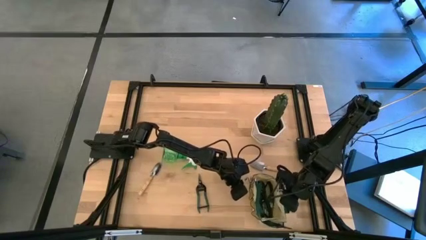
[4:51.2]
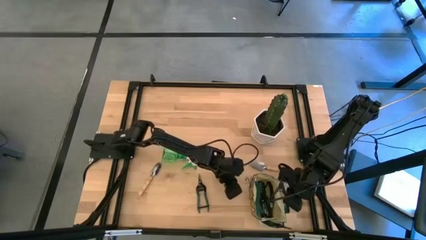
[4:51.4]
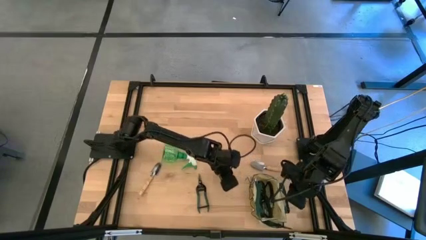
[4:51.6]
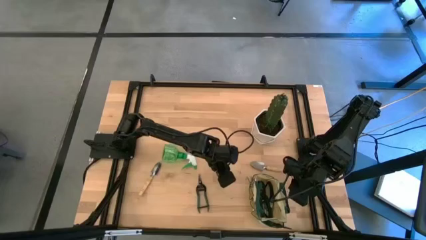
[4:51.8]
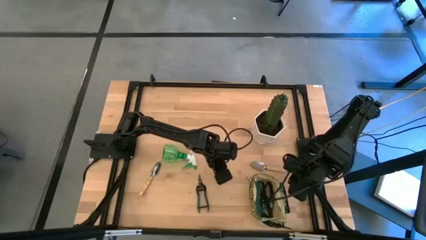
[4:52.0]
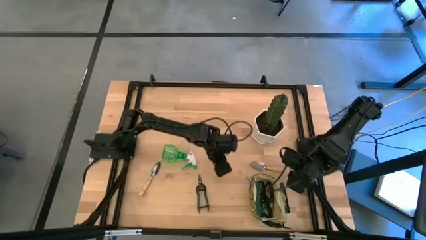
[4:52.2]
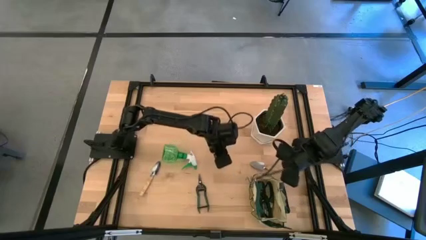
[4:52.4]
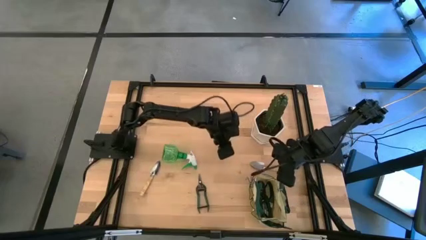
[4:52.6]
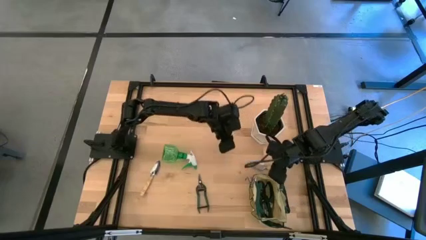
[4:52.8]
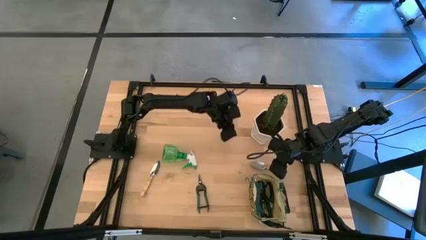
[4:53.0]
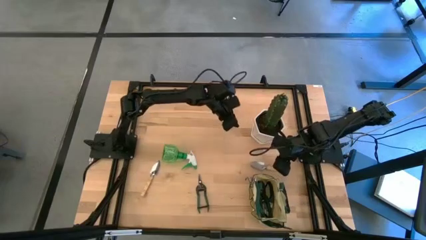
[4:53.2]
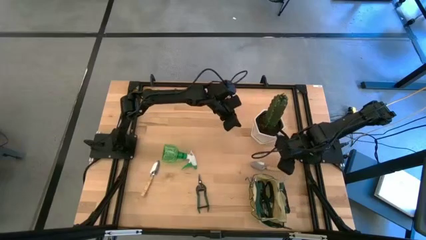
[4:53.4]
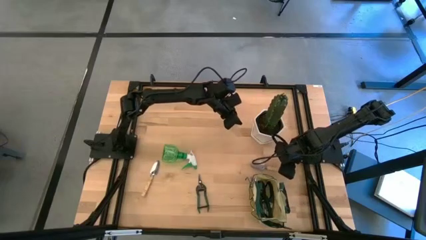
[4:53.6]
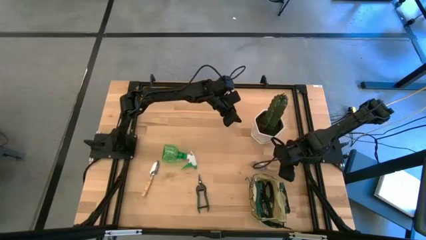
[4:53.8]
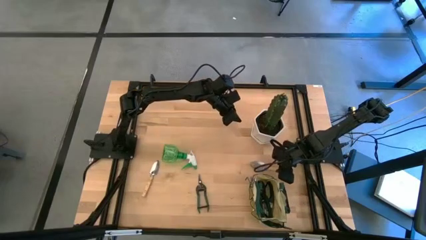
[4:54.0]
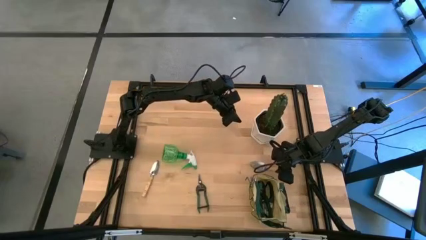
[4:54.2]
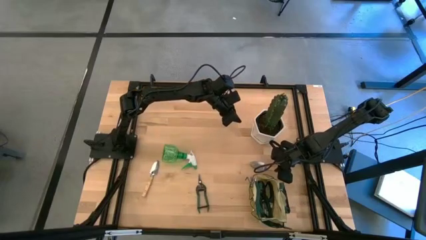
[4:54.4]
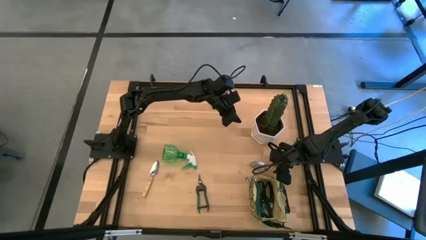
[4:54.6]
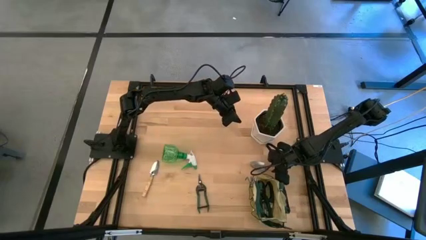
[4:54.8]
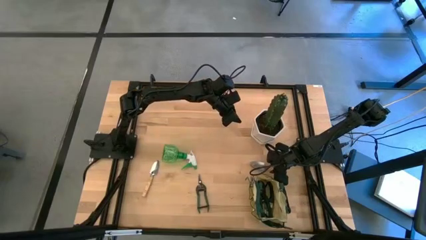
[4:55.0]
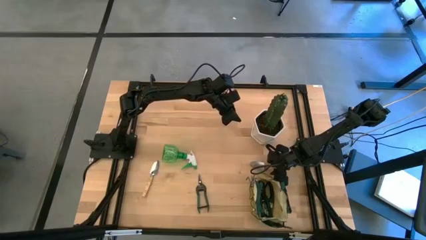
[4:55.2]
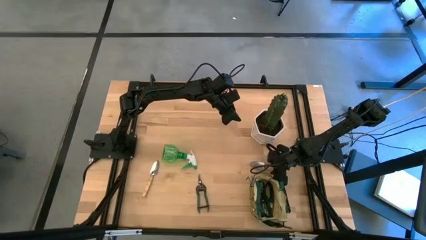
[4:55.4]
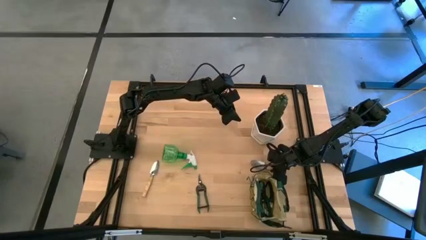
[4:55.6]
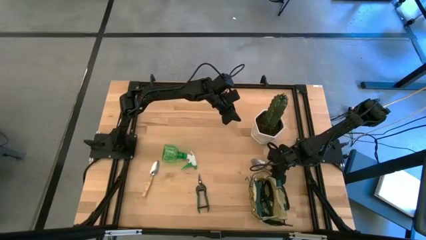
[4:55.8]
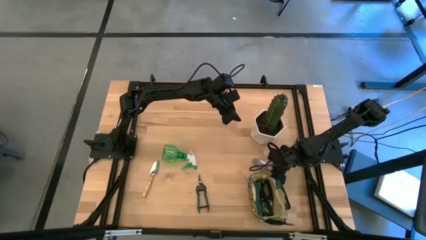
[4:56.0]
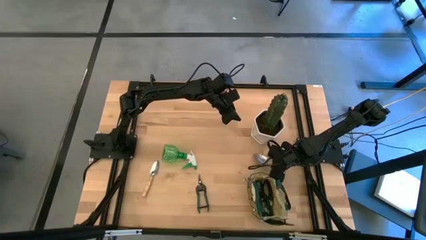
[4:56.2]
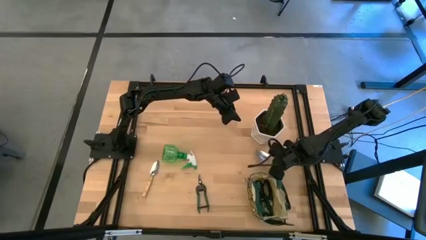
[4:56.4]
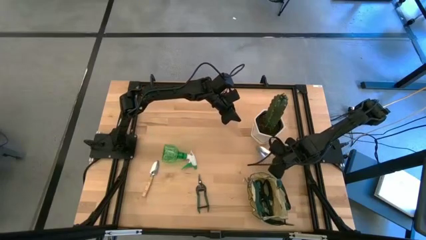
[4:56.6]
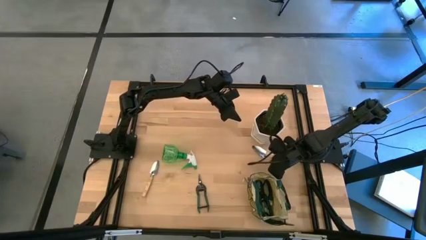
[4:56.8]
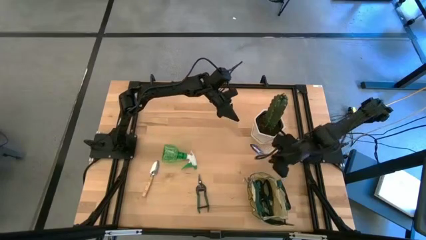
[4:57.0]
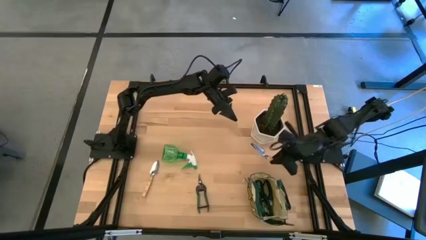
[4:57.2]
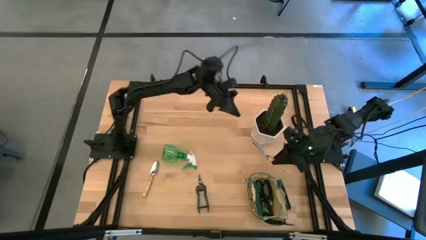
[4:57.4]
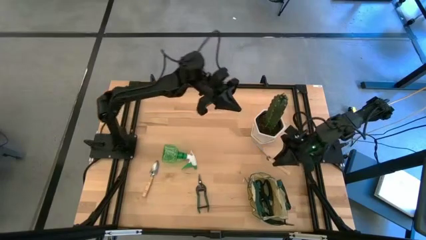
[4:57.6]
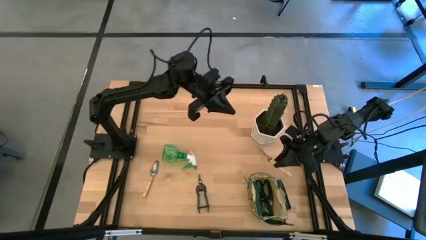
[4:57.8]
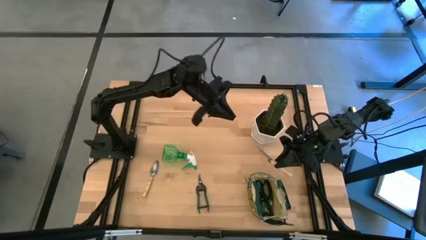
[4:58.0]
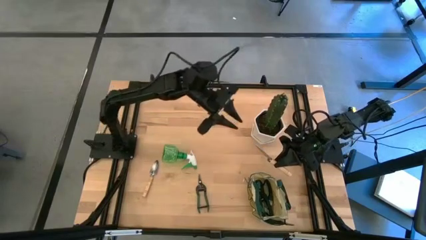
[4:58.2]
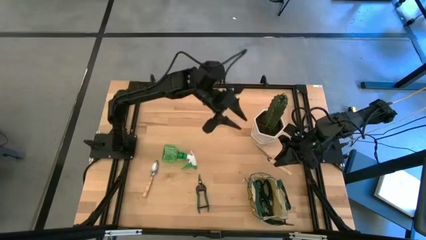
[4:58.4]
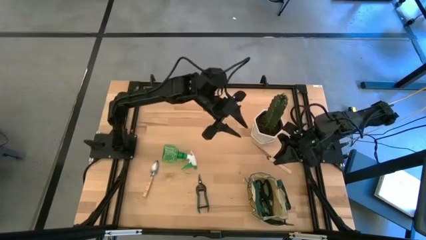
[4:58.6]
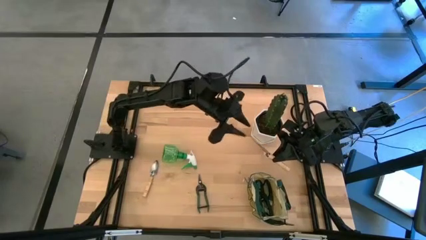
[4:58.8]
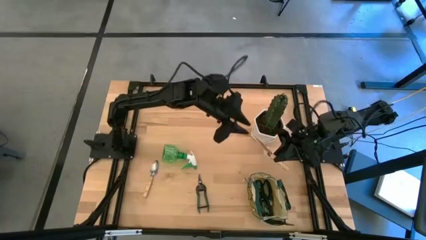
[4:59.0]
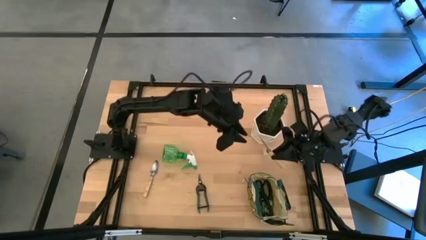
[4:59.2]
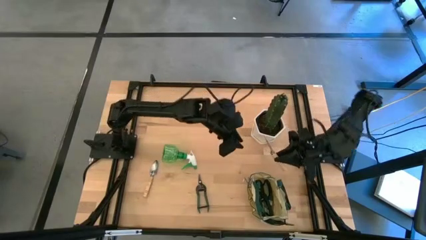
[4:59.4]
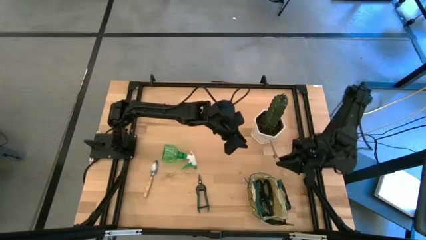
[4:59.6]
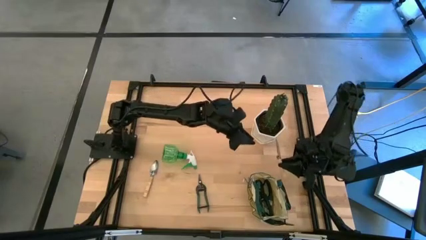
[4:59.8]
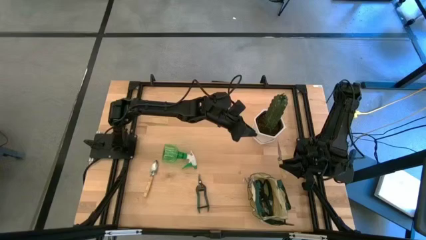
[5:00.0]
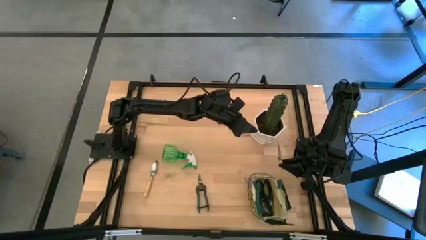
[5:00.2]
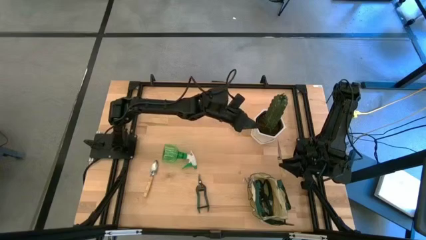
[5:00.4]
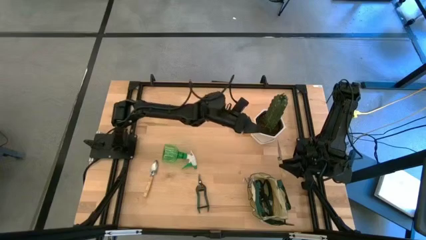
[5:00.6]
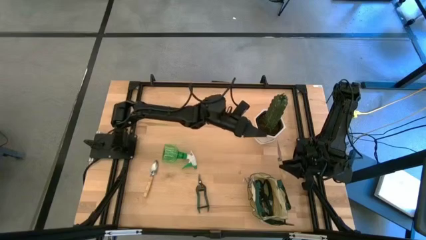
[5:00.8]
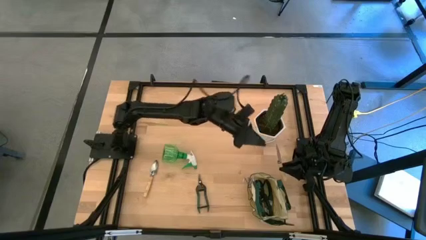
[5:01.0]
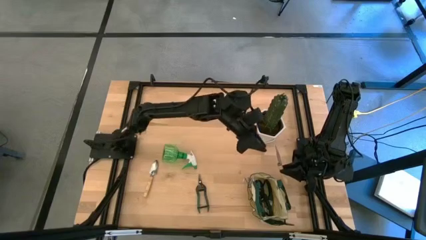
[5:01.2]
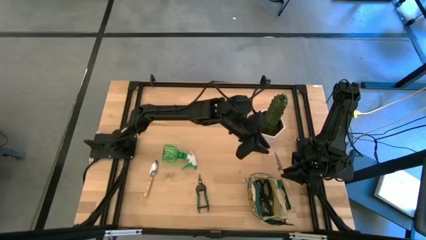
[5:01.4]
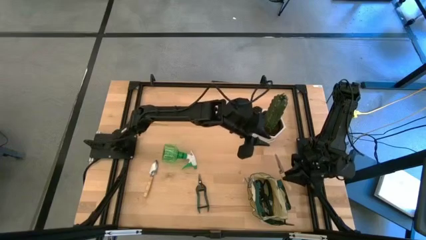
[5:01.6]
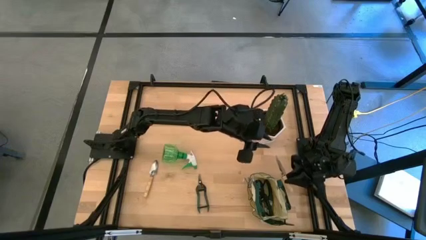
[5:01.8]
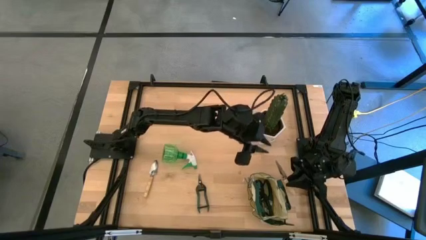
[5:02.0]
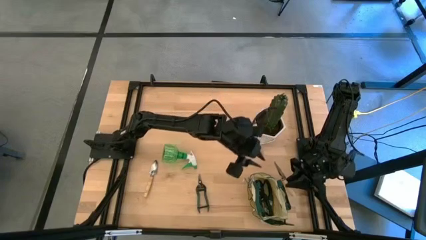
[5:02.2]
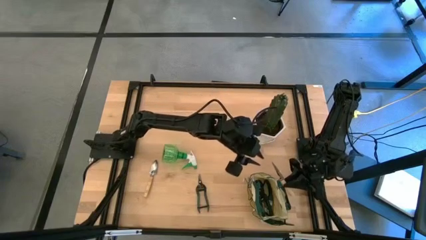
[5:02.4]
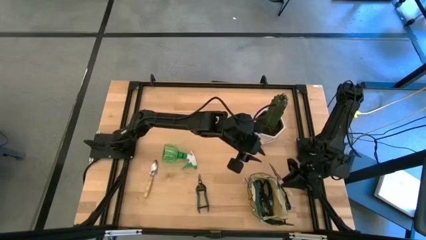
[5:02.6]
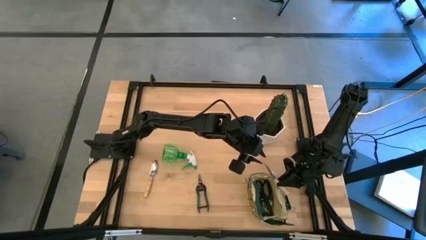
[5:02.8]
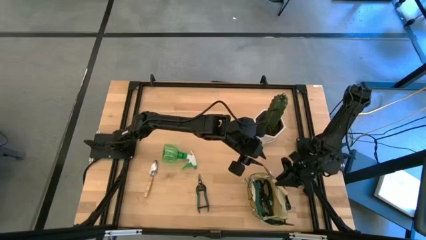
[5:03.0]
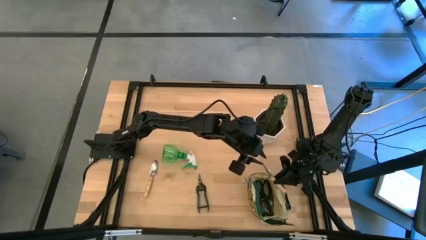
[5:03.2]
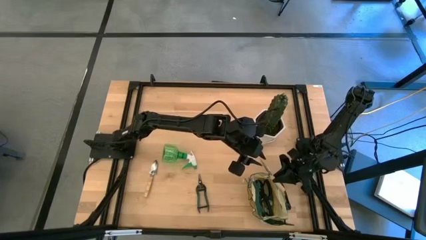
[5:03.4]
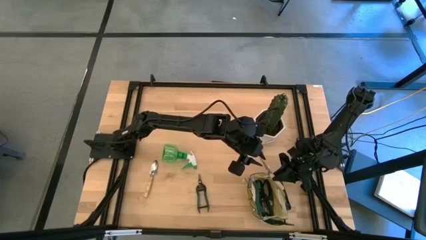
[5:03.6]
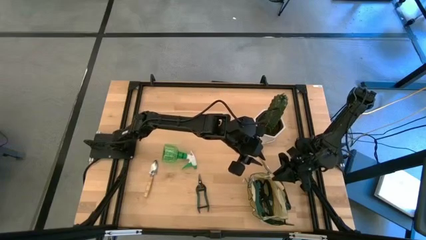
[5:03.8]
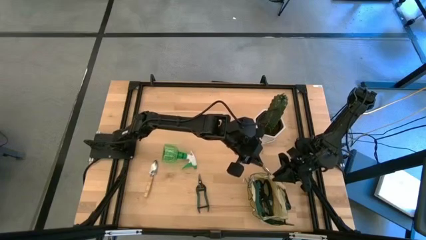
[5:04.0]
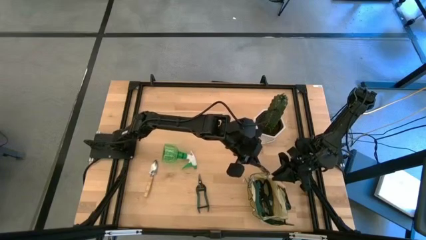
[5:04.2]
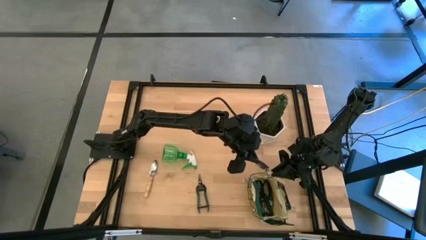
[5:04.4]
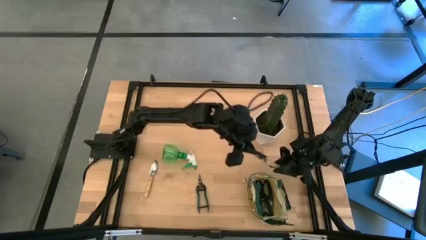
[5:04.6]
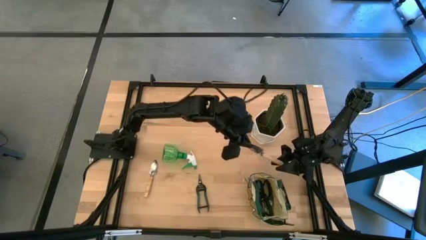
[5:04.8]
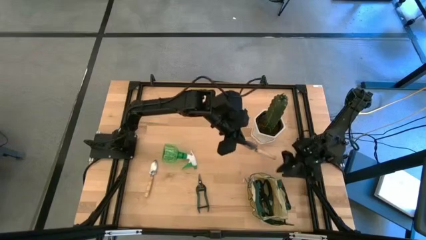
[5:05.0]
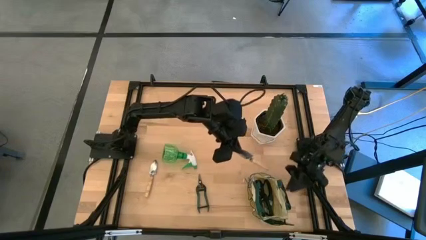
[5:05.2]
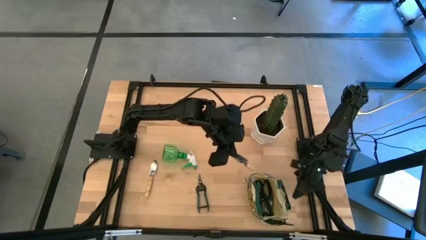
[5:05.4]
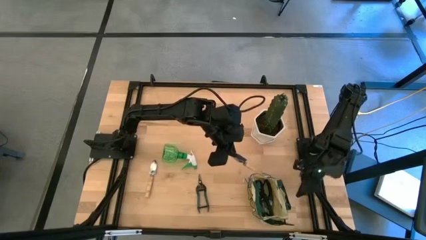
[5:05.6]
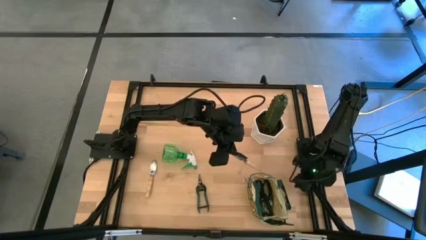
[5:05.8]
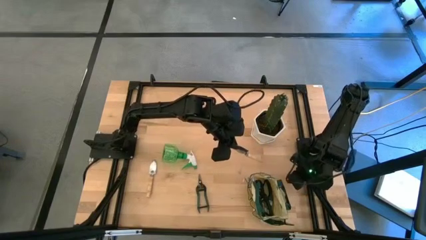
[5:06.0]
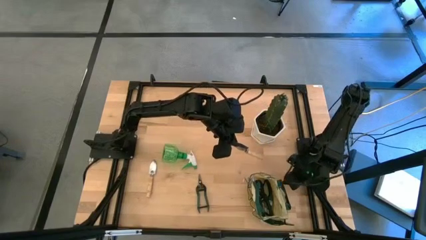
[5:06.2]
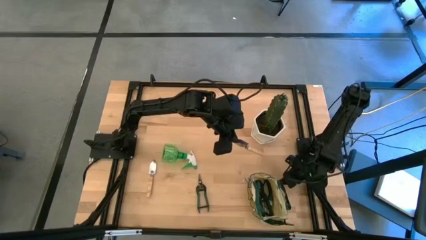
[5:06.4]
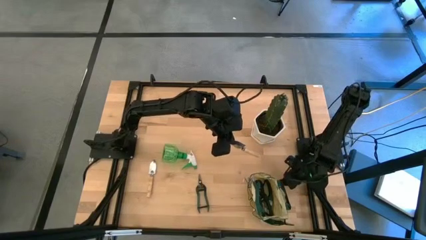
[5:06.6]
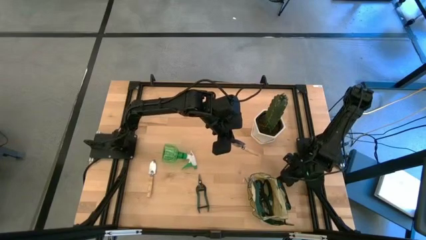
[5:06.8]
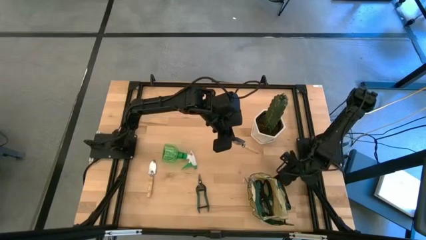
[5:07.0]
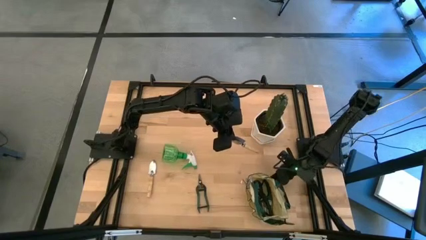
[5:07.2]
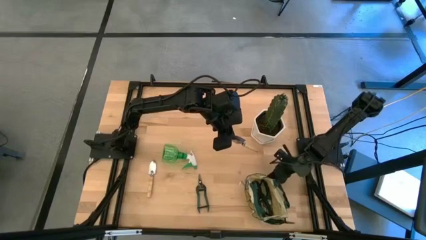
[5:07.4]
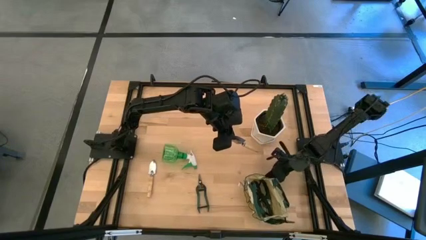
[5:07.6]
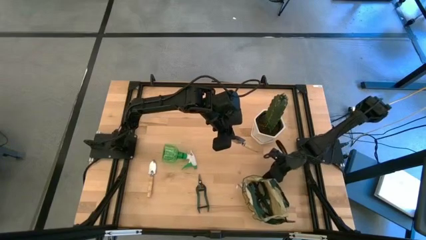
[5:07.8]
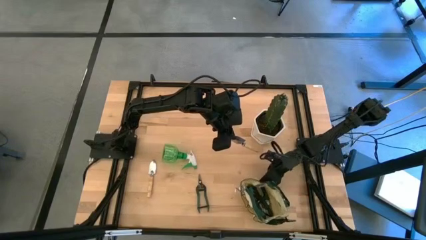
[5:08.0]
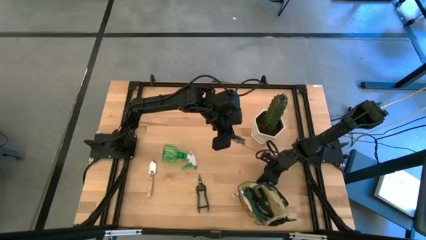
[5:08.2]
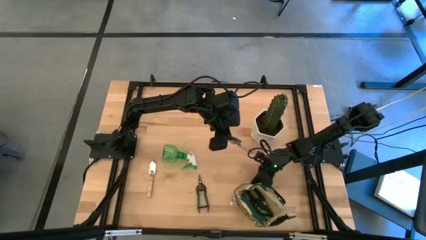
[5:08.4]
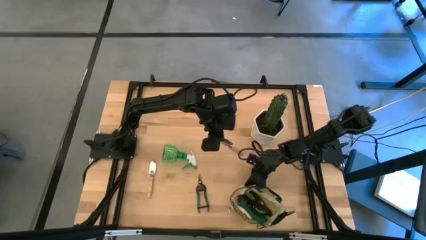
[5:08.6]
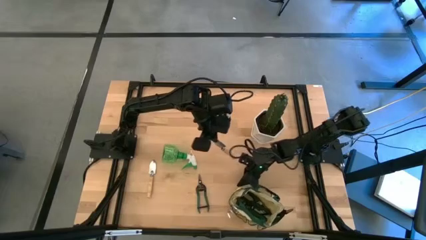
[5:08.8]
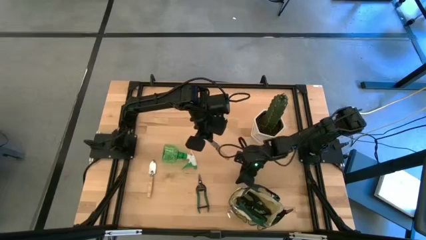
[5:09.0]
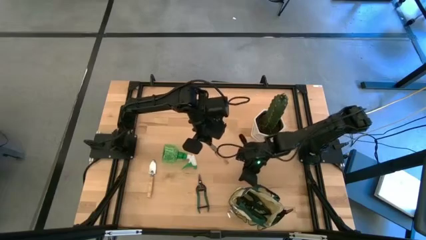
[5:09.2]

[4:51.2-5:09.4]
Task: Pick & Place Garden tools in Gardening bag
Put the right hand trowel into the side pocket of the white bag
